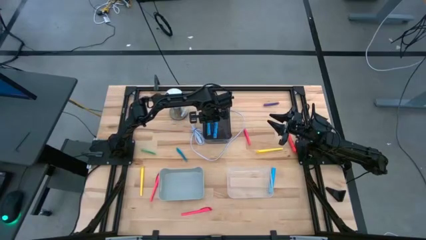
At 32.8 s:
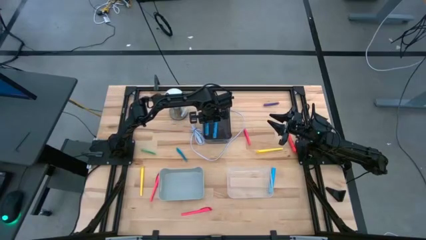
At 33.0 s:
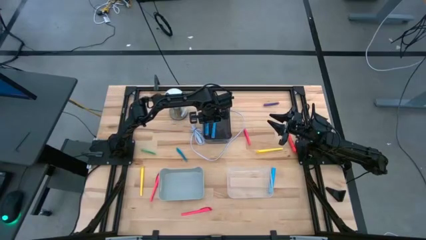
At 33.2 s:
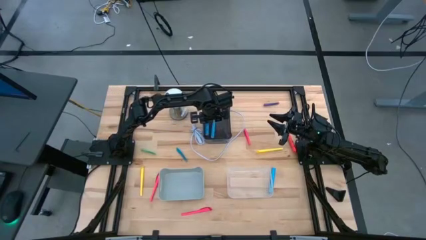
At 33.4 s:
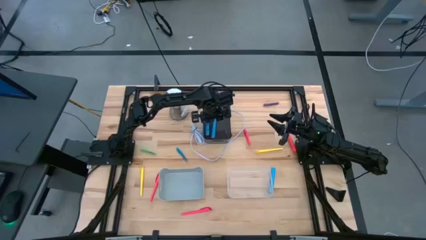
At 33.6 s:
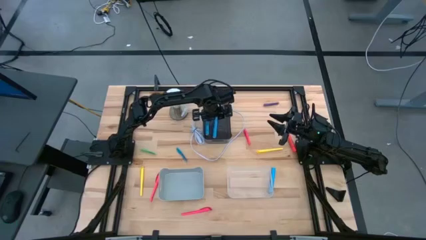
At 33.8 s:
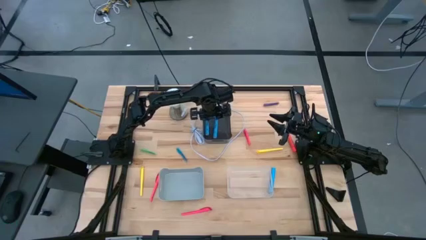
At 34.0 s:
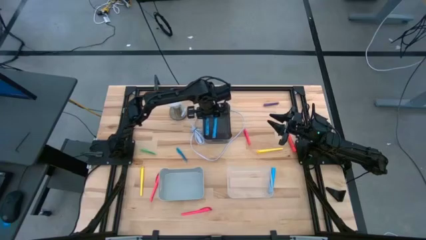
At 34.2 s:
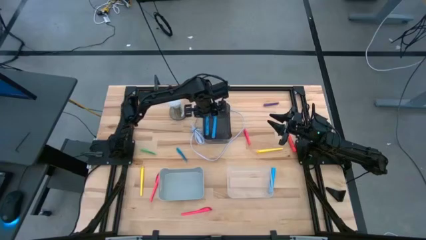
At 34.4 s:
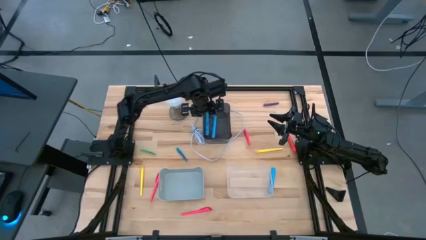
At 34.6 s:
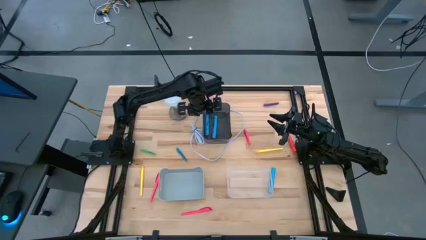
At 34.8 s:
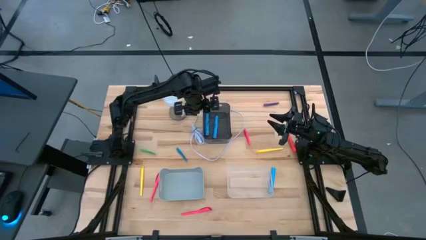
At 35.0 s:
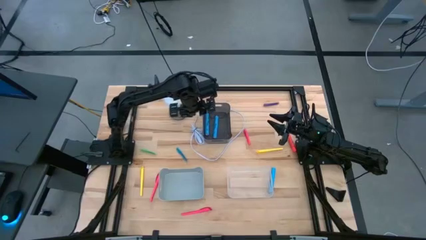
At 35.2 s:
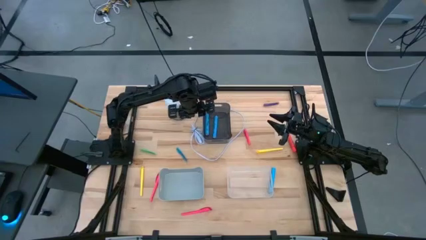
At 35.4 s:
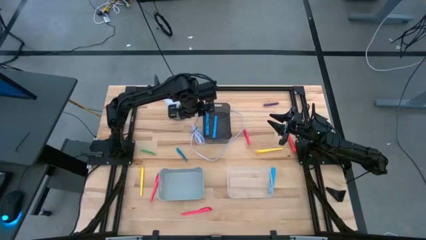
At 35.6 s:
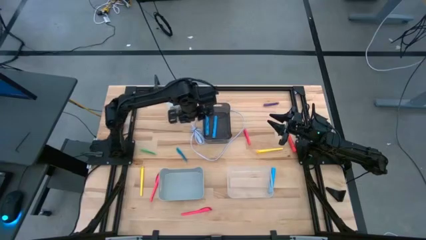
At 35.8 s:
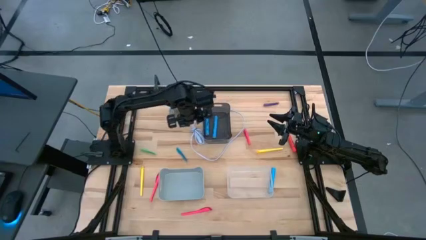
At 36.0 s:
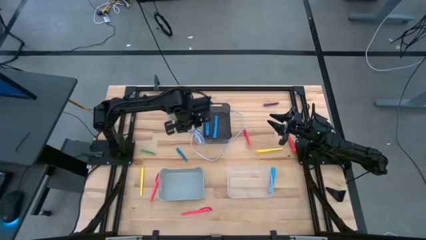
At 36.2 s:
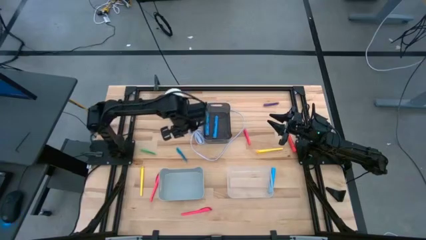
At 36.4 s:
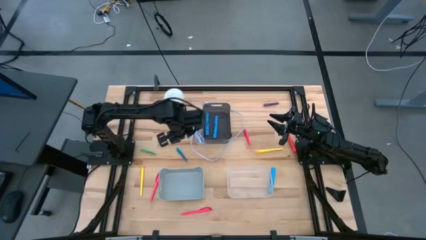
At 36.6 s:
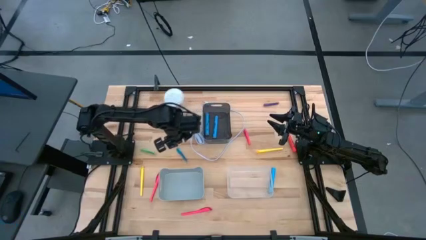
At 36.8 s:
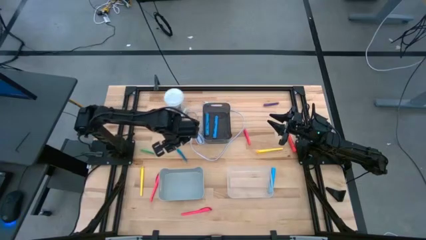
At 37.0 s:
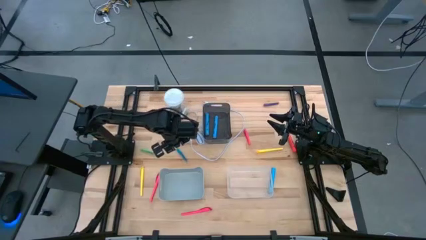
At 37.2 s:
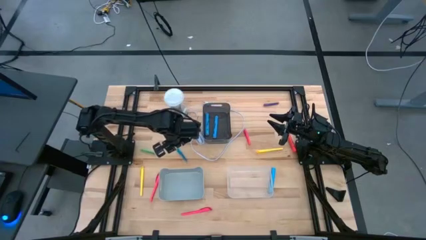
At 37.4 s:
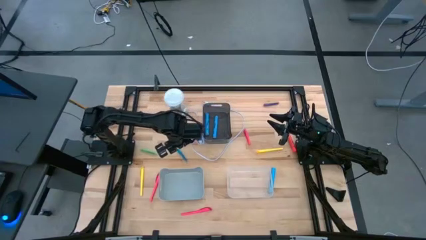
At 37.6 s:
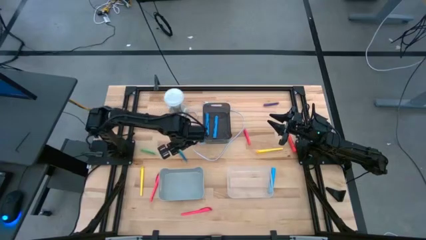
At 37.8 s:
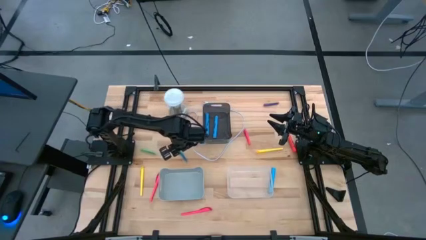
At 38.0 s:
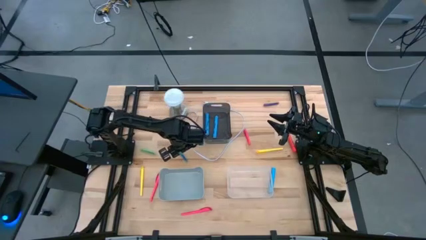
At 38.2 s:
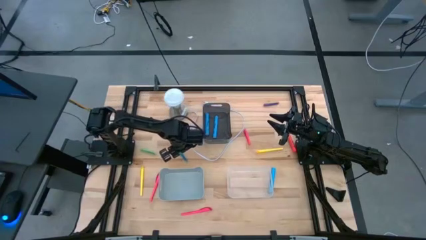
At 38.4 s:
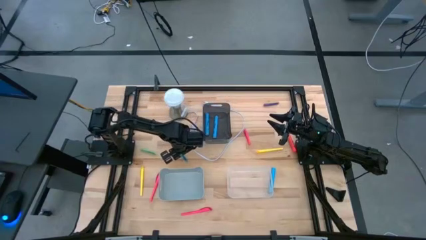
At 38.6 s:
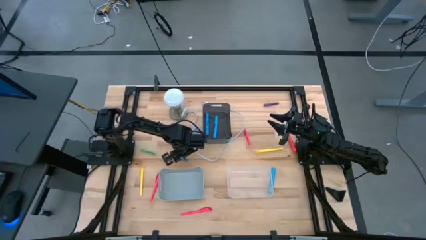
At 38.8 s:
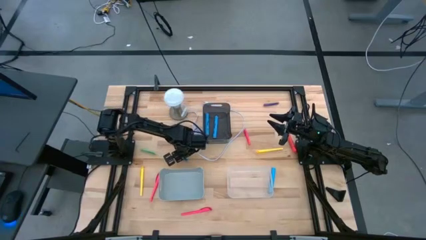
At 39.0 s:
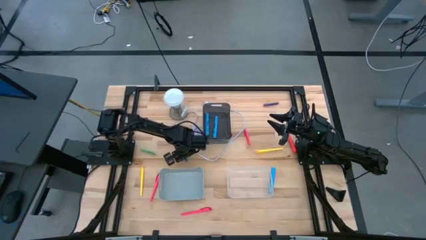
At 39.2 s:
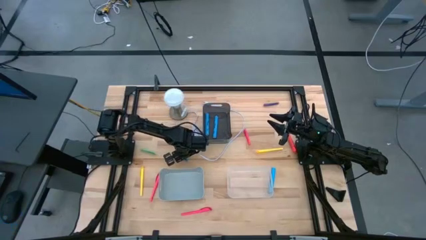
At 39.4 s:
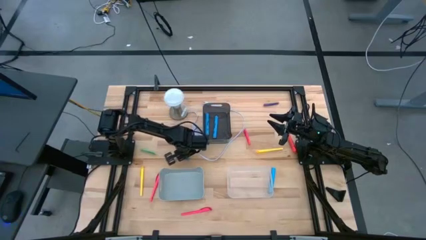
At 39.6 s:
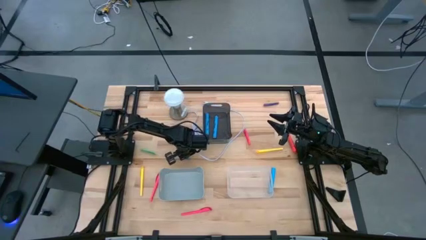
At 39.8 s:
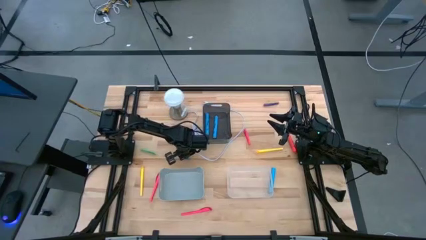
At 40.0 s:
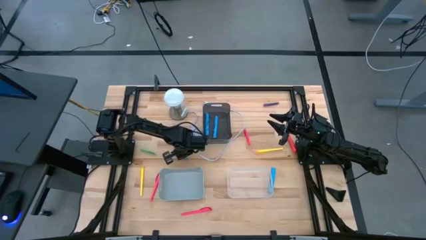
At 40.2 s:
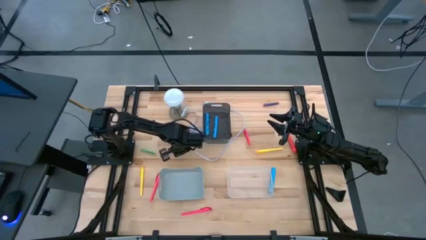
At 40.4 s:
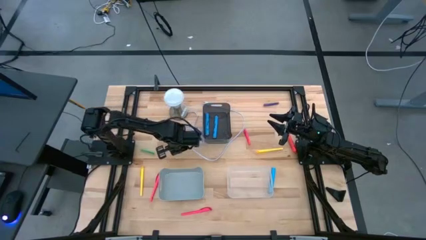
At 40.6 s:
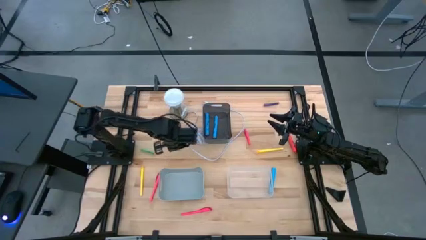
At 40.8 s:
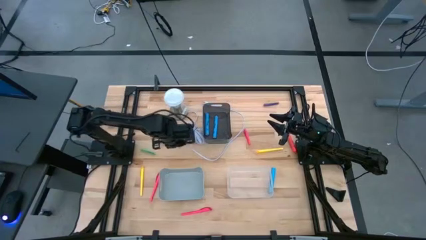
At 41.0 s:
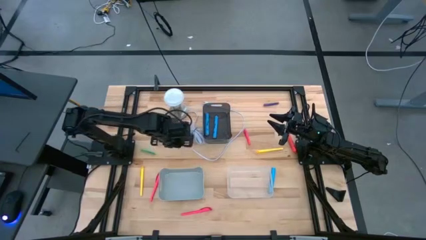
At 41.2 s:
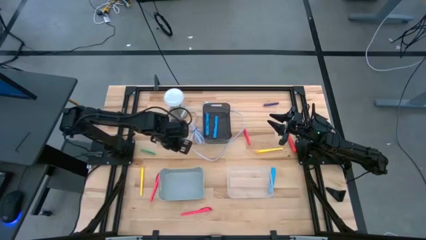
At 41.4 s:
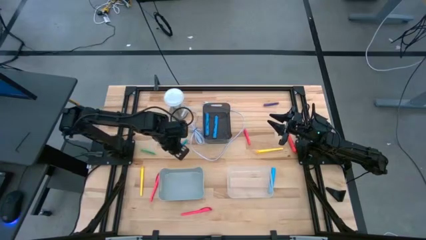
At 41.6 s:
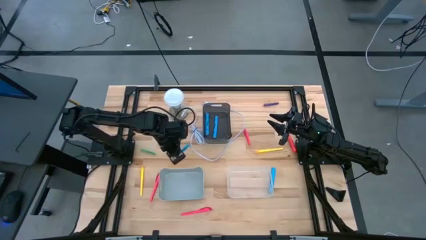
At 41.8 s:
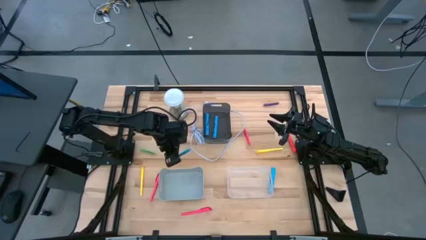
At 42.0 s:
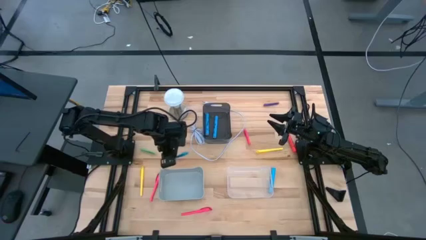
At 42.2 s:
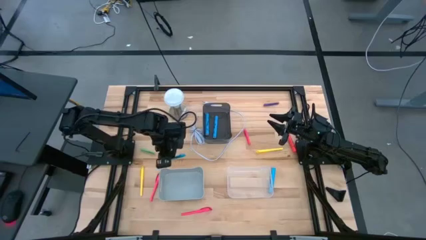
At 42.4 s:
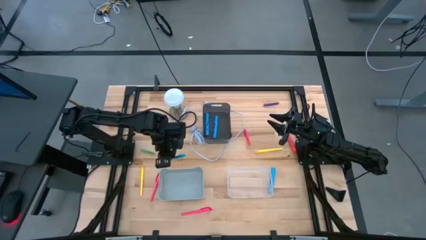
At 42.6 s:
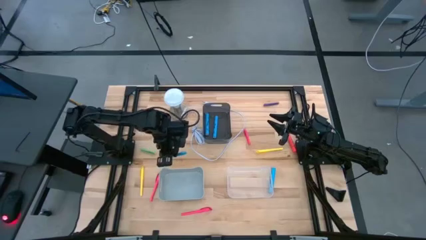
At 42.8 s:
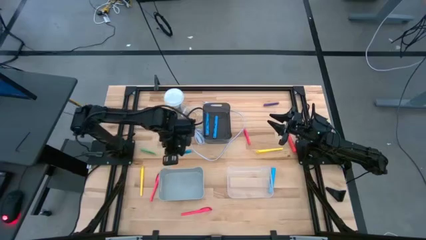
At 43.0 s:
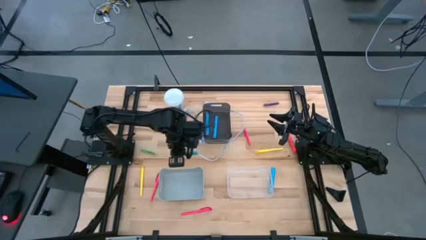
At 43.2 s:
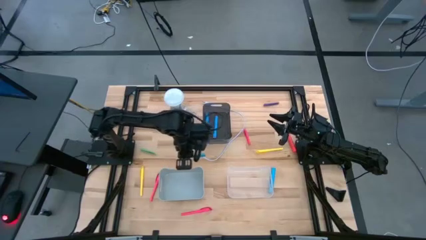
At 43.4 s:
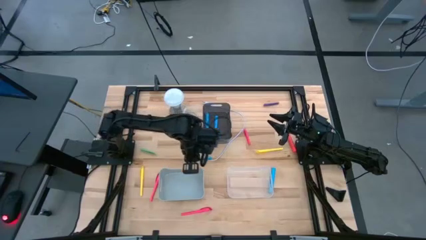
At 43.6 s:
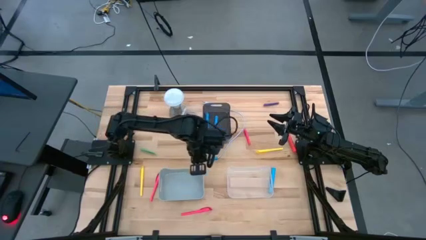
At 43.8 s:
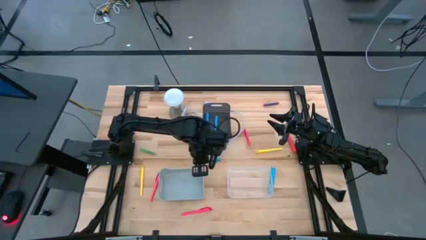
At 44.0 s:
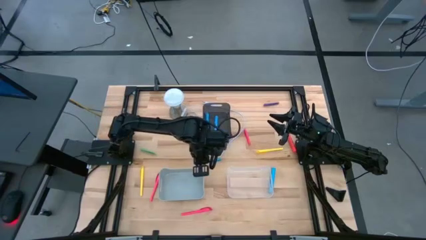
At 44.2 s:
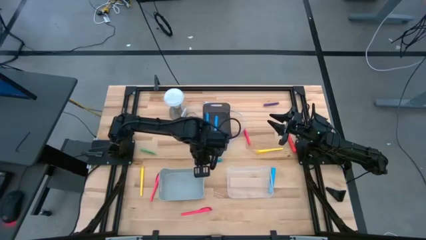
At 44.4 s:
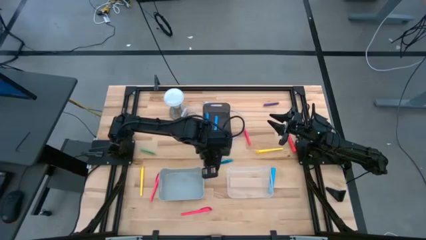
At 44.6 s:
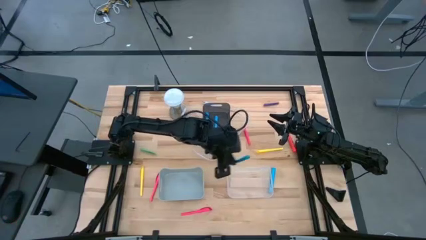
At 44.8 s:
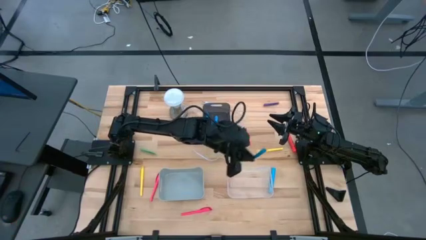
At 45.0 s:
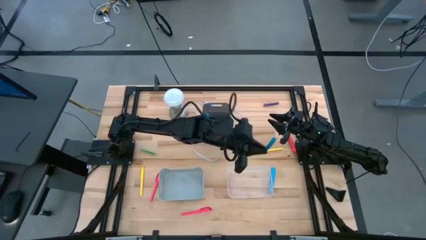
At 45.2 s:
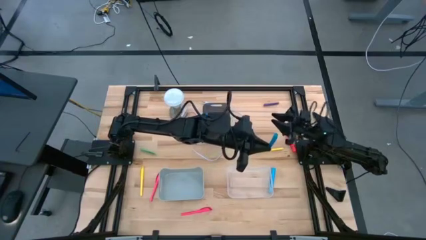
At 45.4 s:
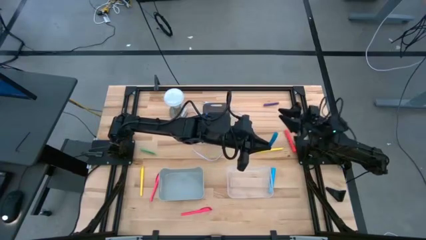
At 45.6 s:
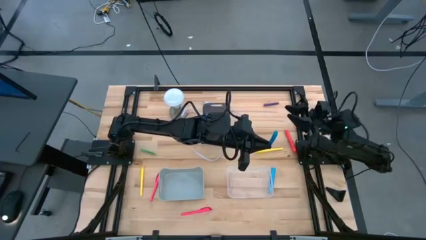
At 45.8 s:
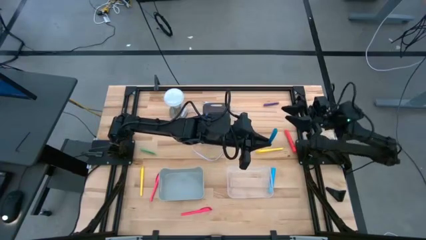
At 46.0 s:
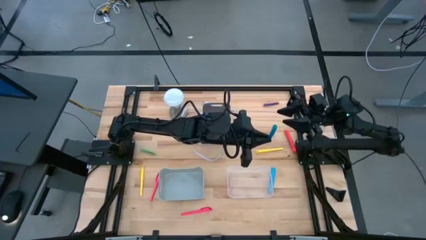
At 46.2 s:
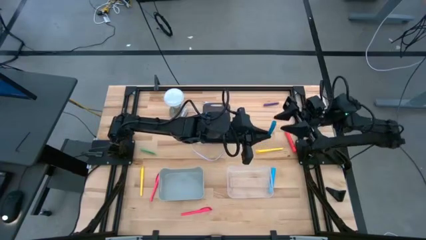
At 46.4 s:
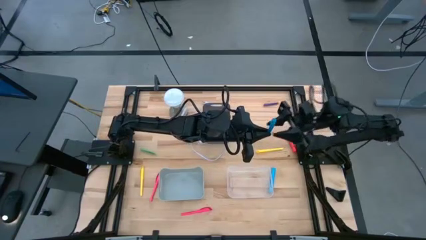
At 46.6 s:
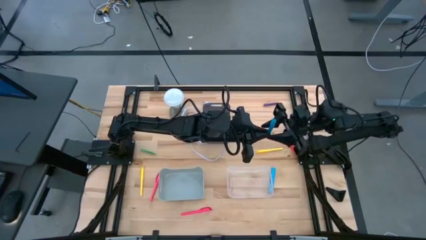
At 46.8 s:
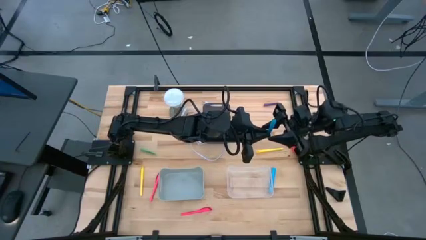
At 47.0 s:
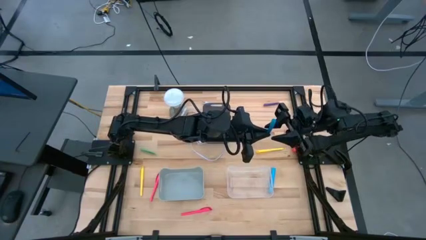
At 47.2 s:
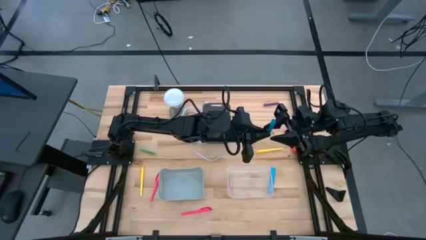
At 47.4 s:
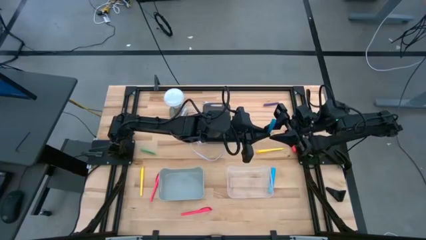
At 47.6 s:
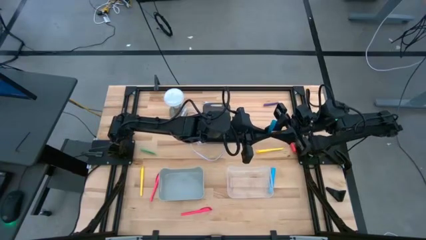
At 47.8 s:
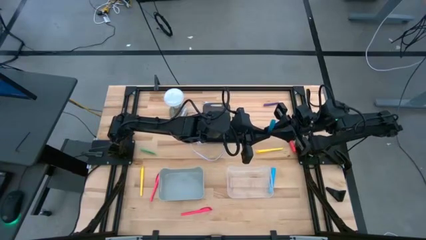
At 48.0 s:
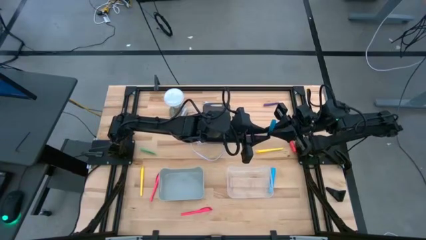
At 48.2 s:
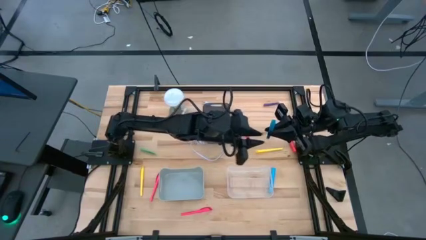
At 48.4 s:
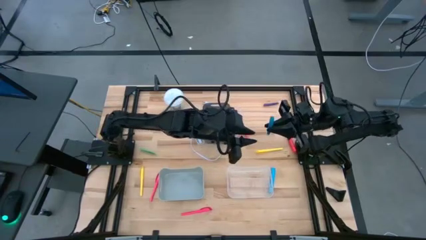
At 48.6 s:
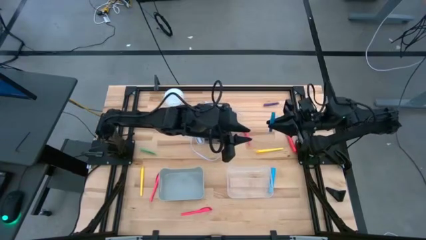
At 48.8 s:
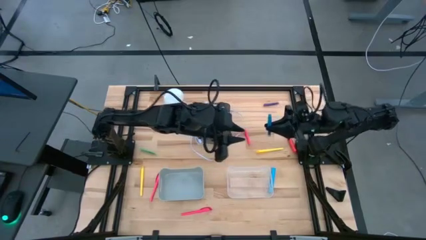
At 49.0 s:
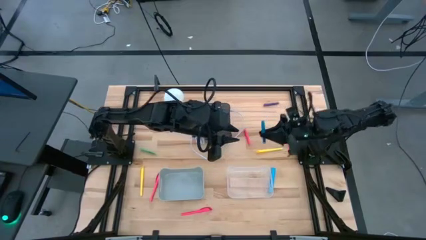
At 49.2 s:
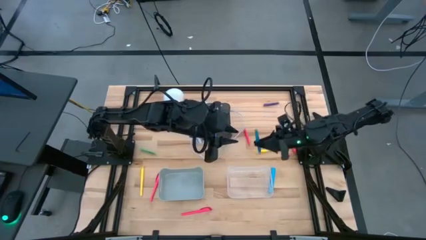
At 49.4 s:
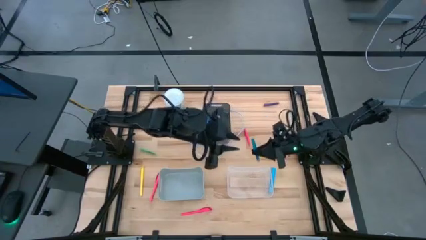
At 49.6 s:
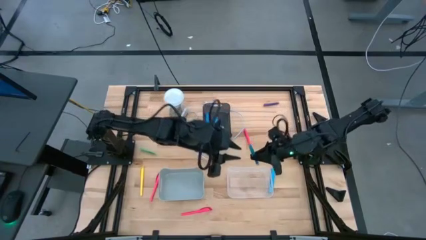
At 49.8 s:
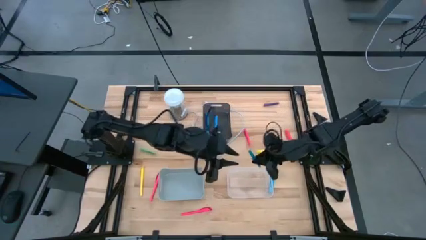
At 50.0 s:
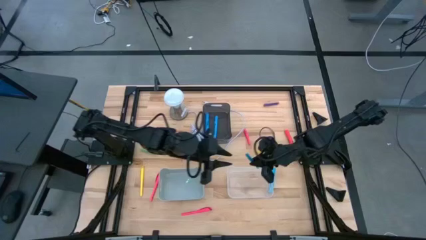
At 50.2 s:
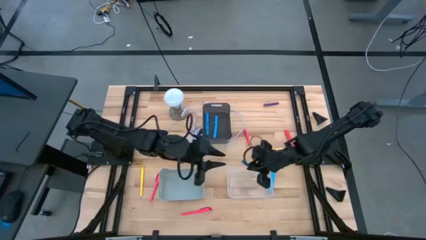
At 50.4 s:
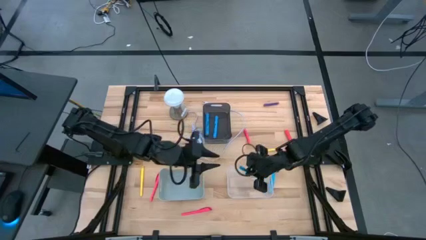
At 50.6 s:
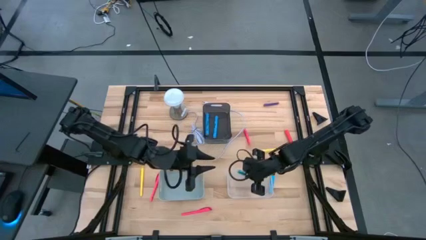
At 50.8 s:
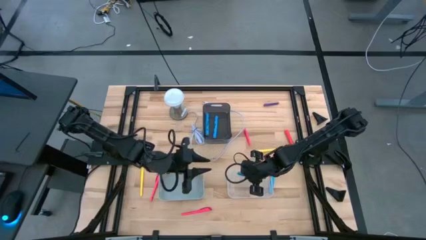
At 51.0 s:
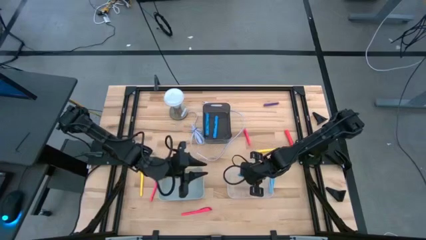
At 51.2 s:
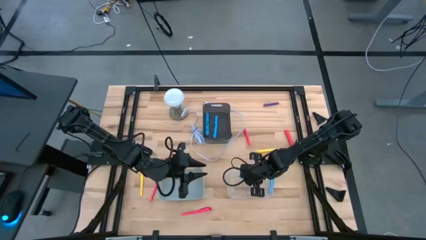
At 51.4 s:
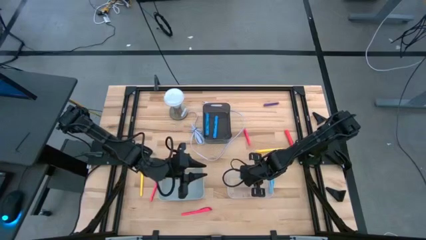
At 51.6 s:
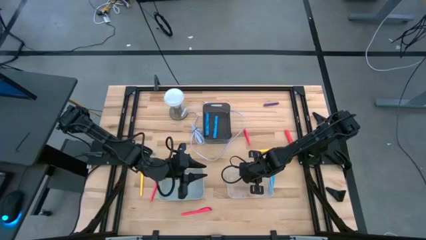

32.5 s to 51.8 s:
Task: Pick & Place Markers
Put the blue pen into the transparent bin
